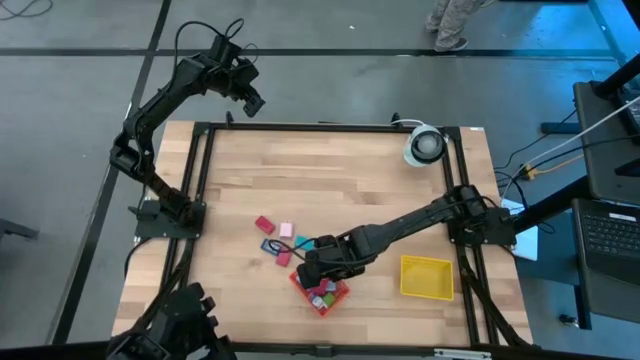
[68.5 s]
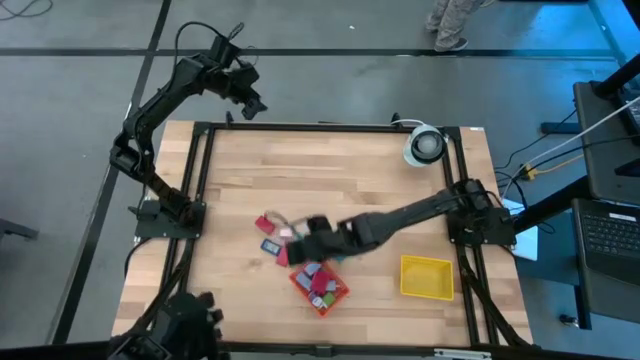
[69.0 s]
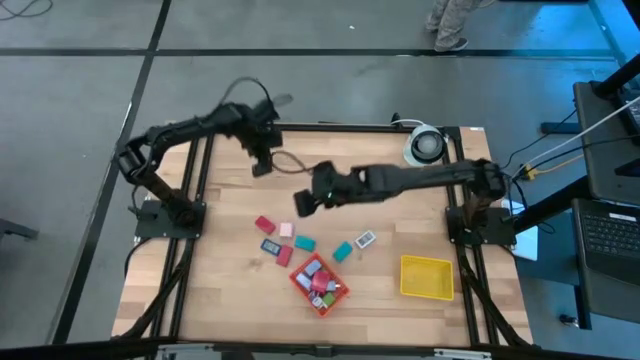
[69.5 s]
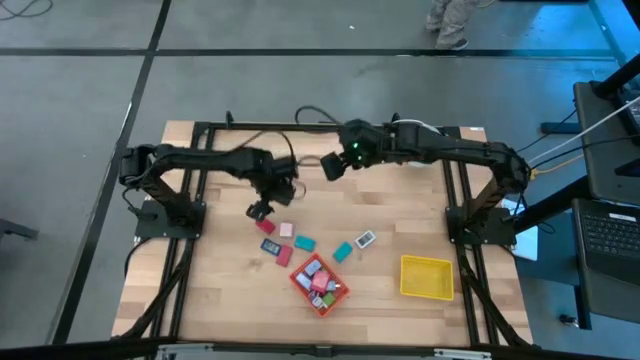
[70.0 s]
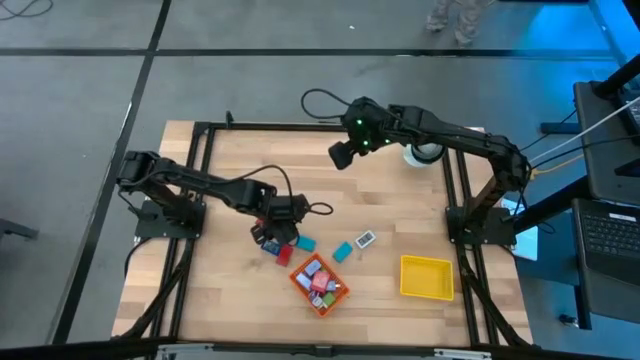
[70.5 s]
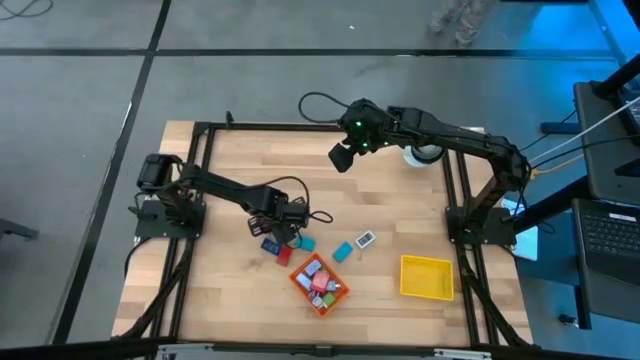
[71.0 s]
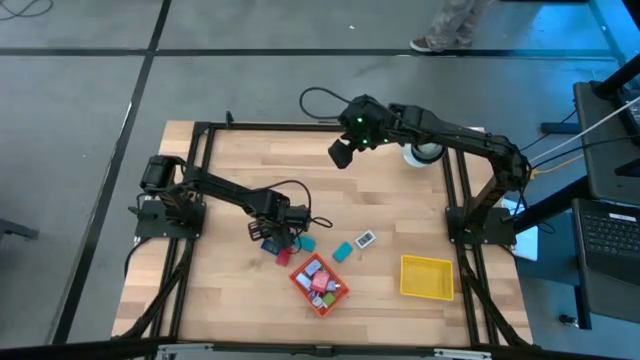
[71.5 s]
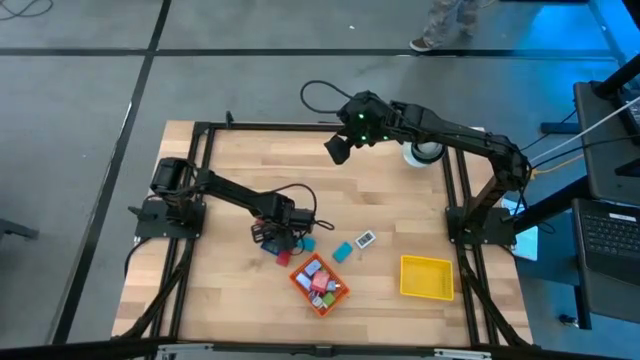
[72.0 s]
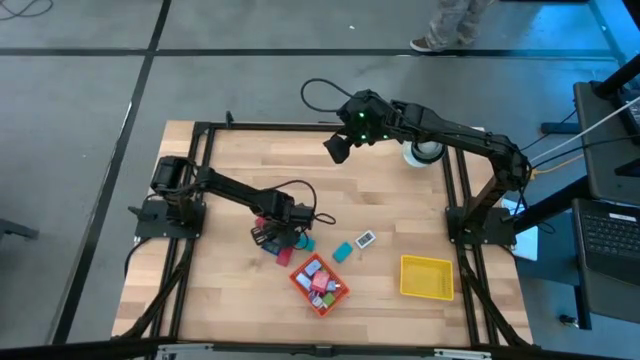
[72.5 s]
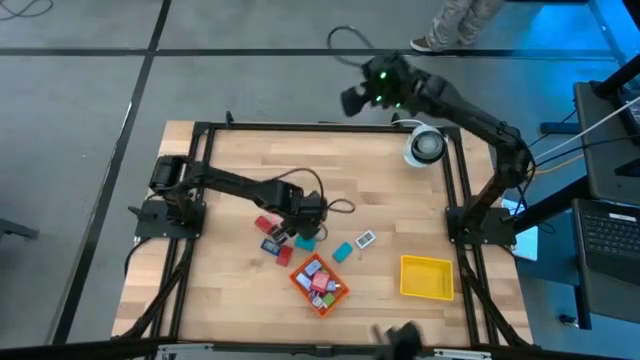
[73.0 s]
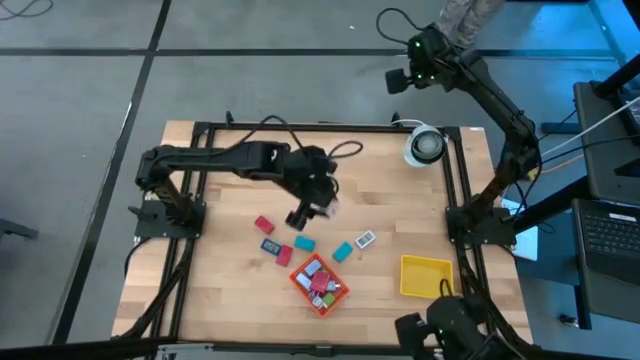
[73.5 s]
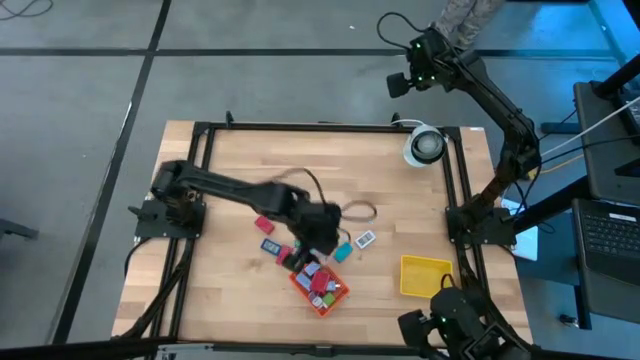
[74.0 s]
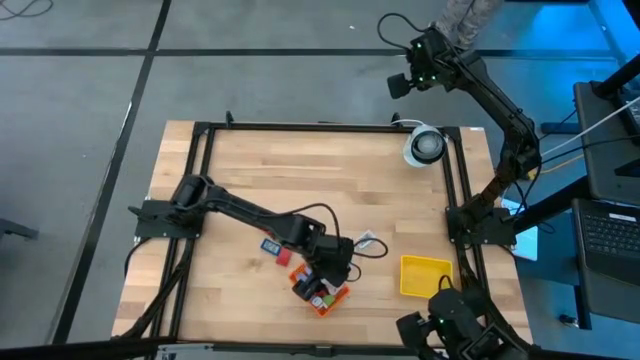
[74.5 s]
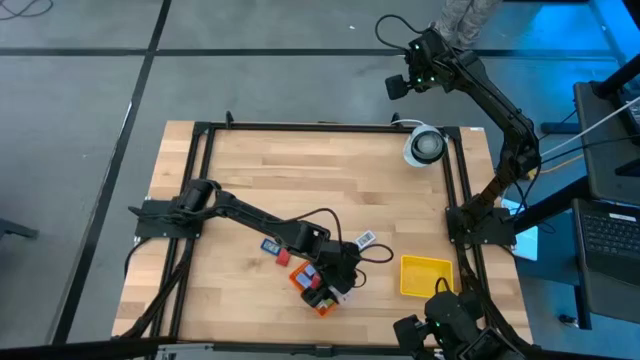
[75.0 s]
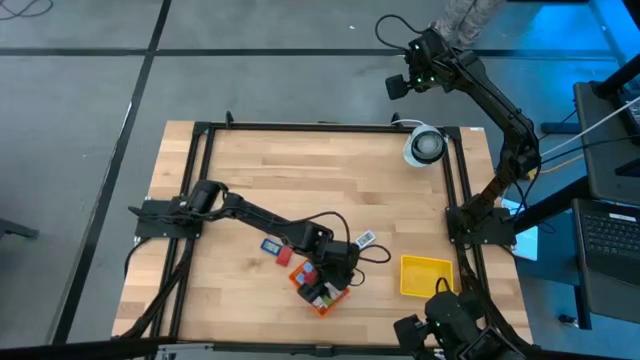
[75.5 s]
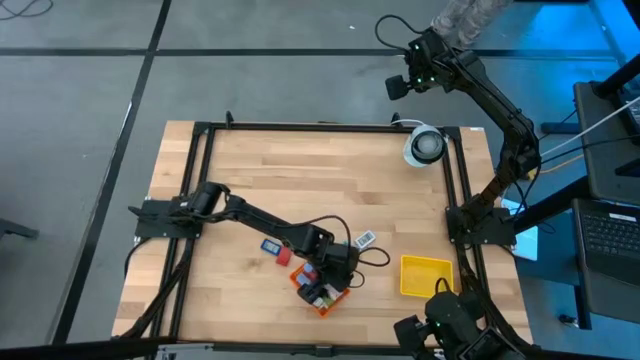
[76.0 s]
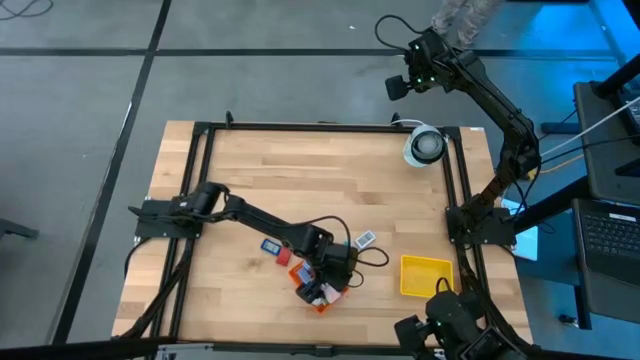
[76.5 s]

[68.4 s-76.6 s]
Task: Pick & Place Office items
Put the pink charger adapter into the orange bin

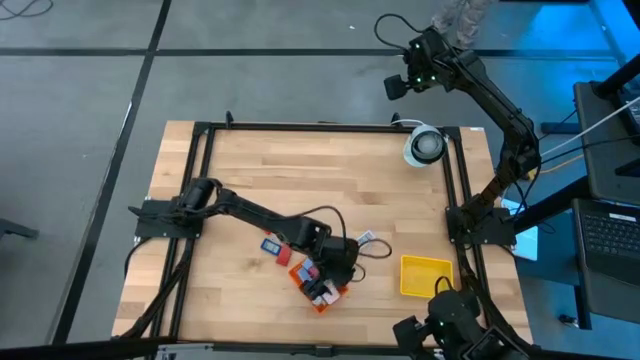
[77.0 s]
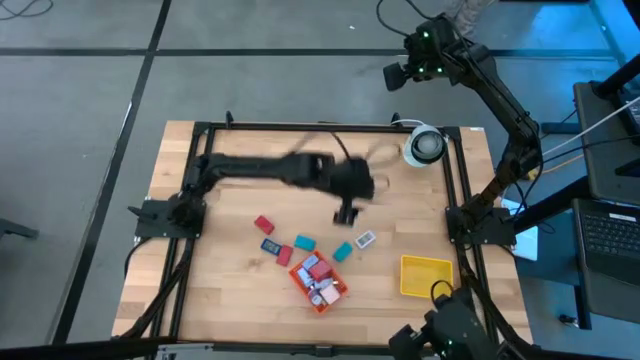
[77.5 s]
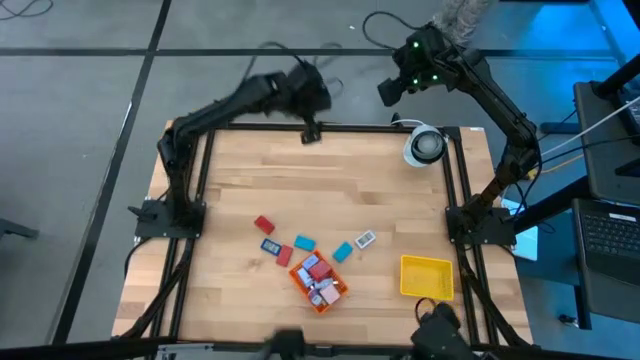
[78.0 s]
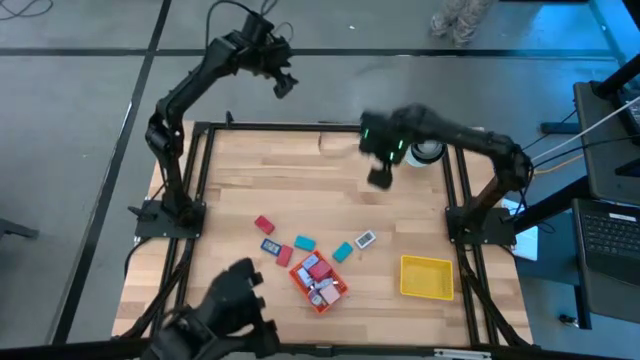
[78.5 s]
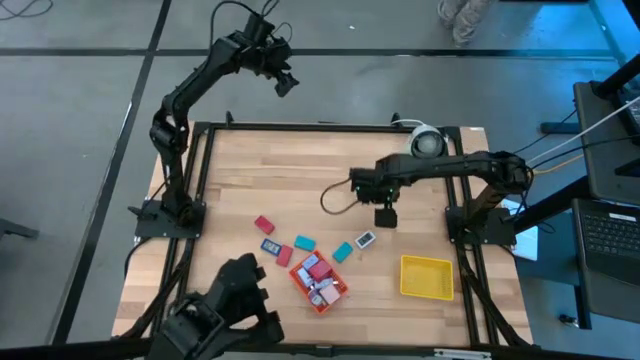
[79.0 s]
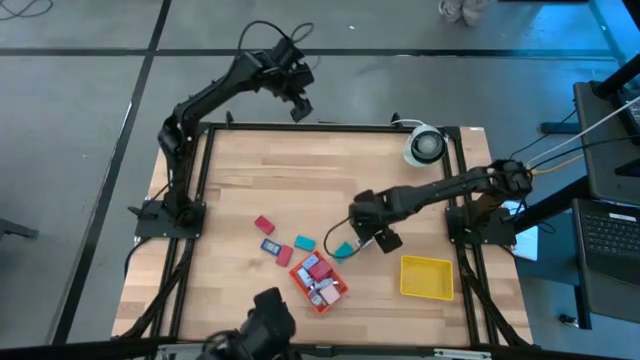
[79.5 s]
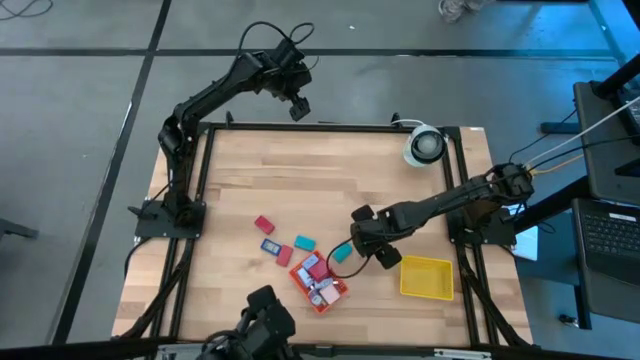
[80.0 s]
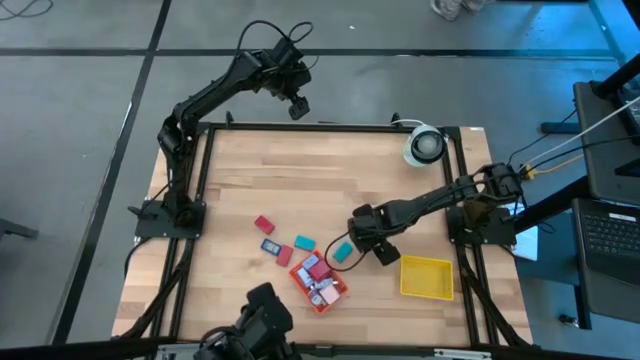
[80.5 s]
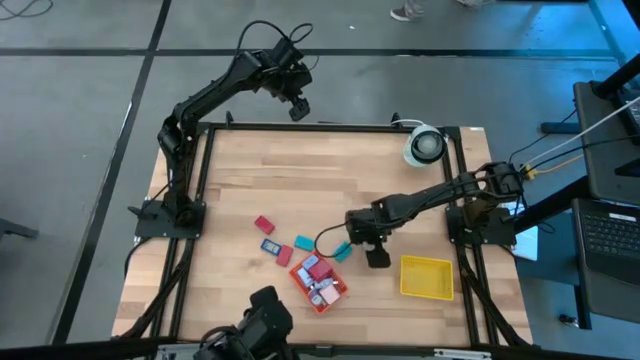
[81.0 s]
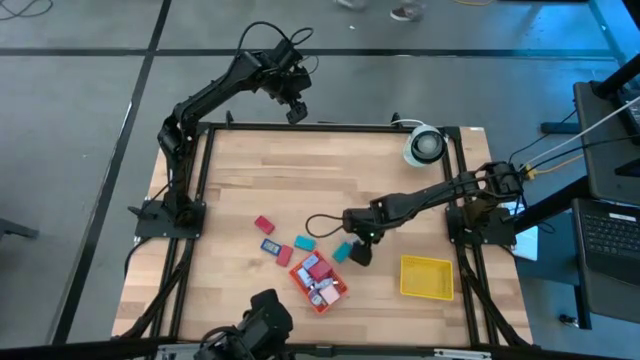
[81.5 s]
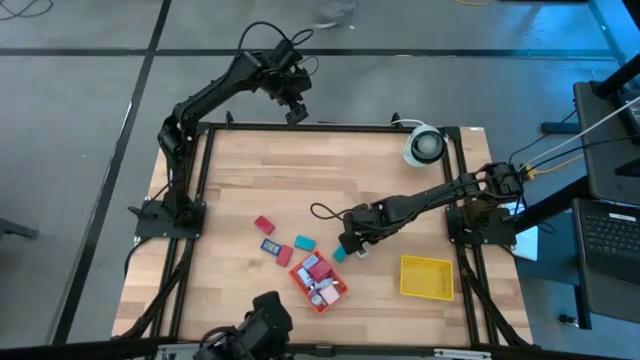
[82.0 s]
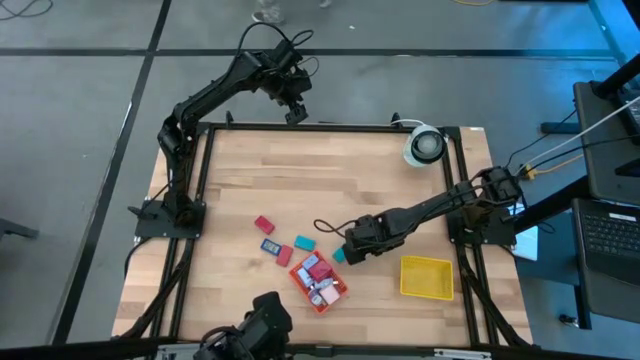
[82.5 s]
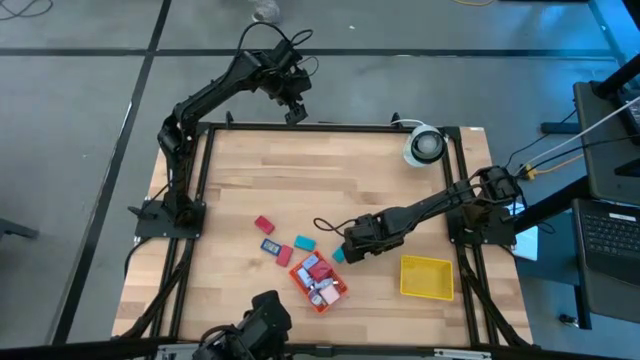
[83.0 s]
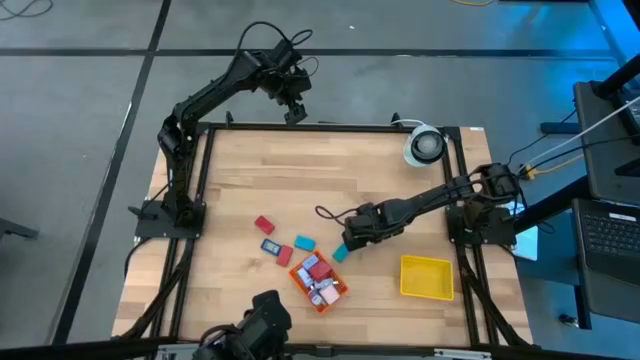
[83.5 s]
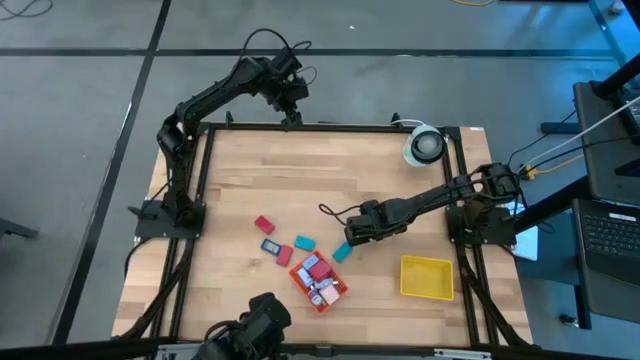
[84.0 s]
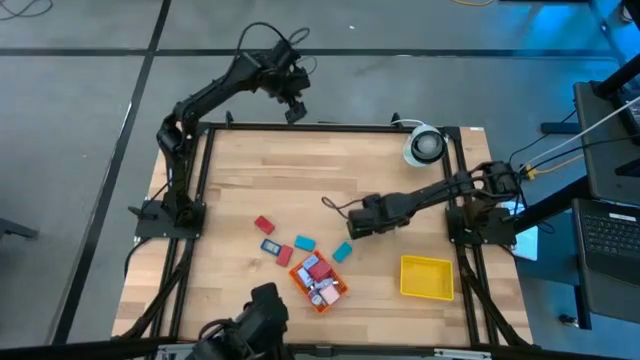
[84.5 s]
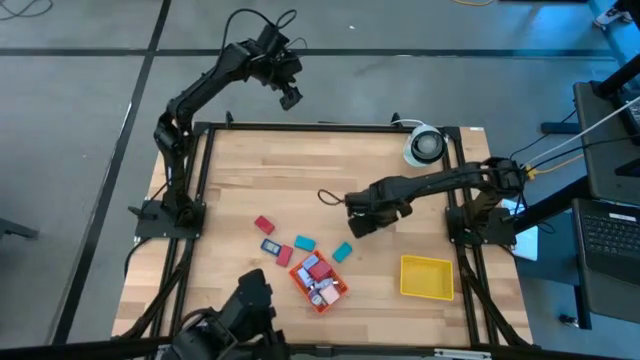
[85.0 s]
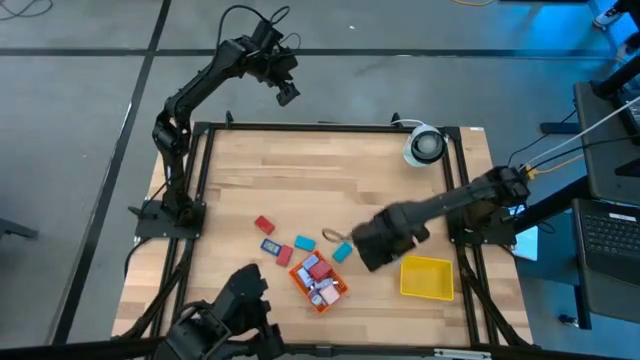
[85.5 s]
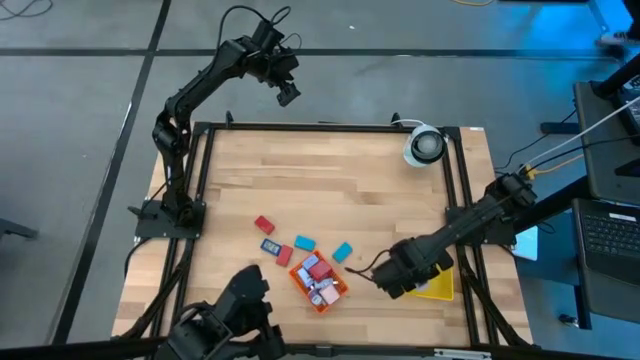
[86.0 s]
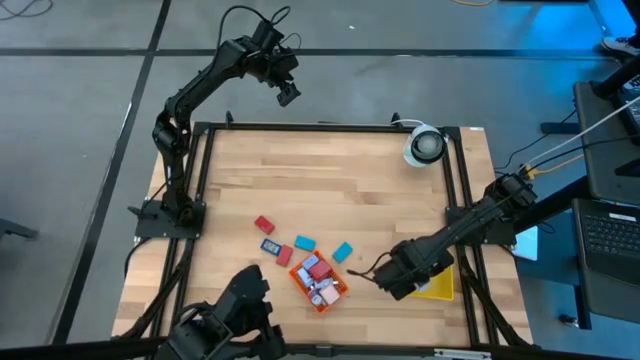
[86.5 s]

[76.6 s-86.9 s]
Put the white digital clock into the yellow bin

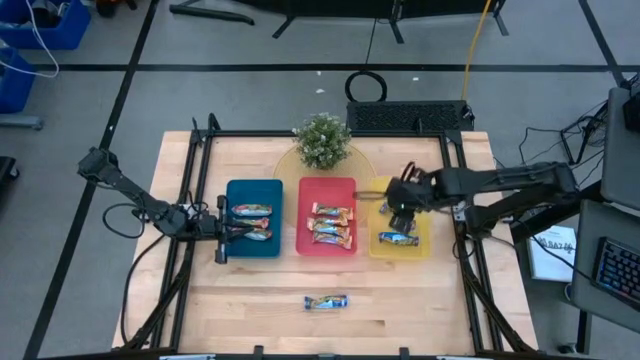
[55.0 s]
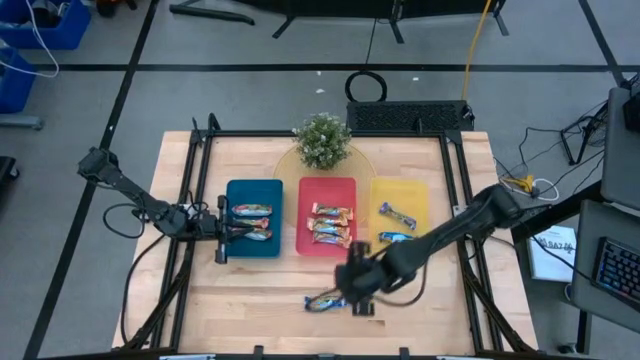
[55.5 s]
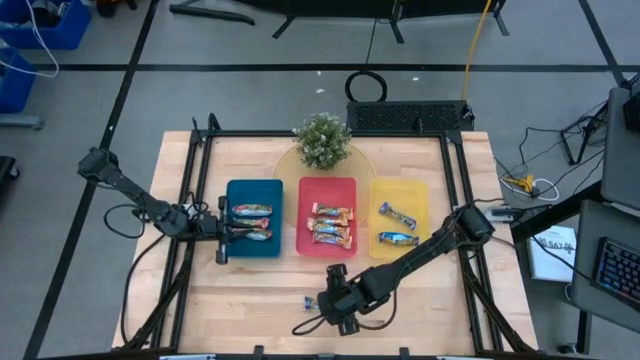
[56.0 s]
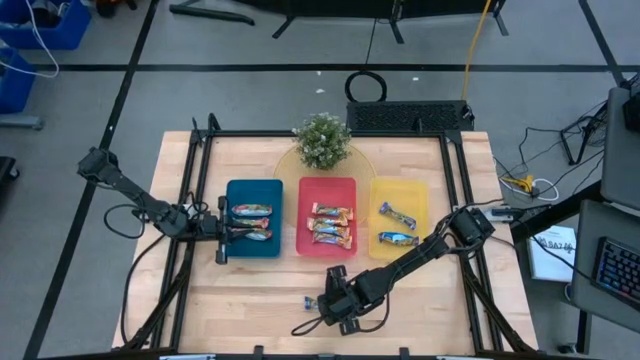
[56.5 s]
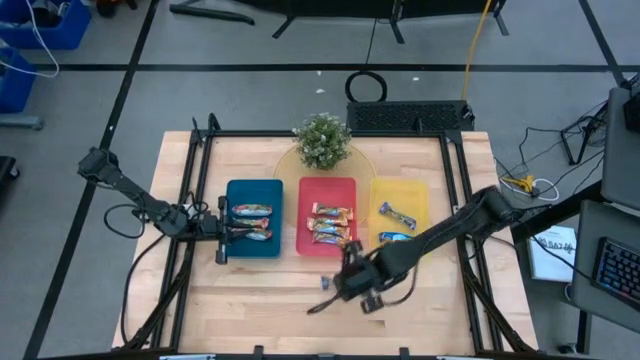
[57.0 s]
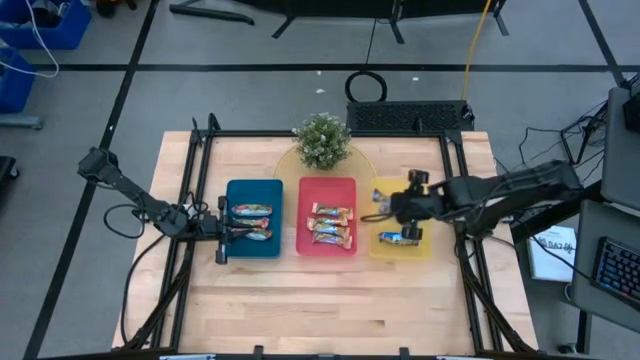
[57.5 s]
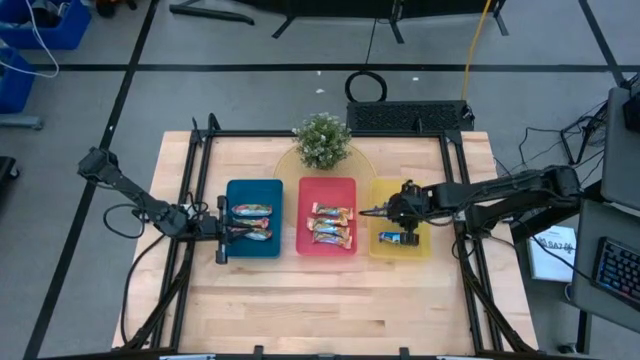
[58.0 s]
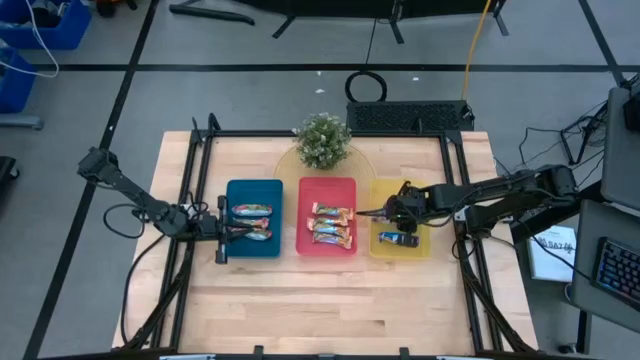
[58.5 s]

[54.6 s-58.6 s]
Task: Pick and place Granola Bars by type
Put the blue granola bar into the yellow bin
